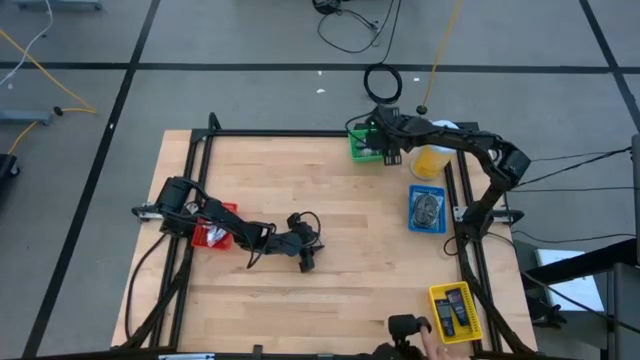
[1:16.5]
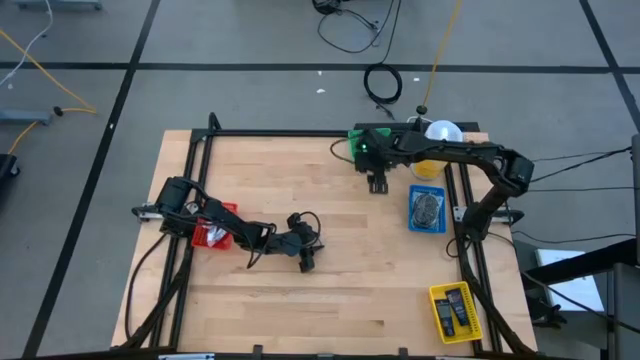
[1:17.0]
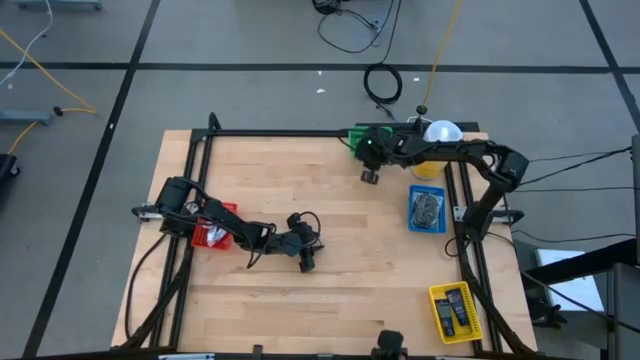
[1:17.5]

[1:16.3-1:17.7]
Task: Pick & Place Travel size toiletries
Adjust the green bin

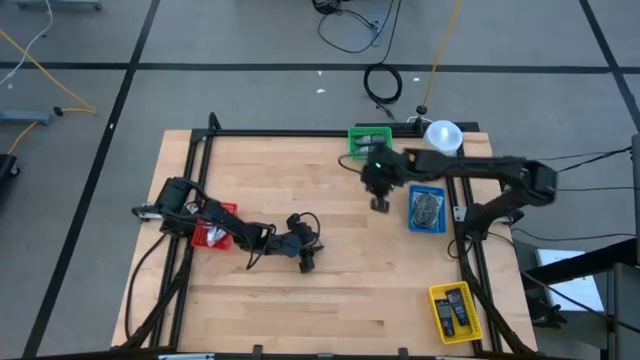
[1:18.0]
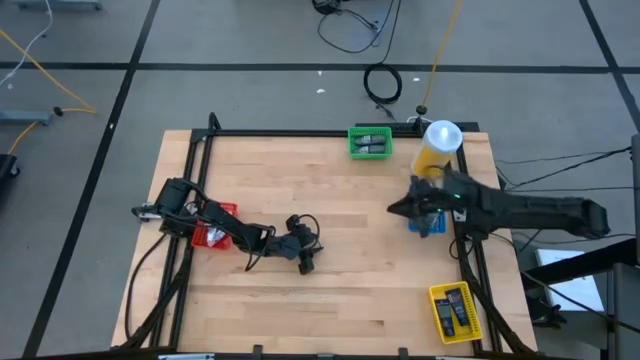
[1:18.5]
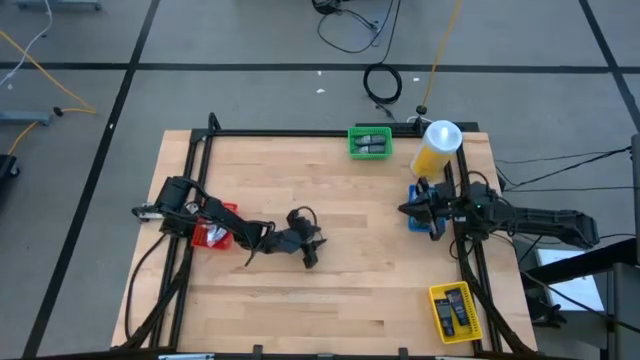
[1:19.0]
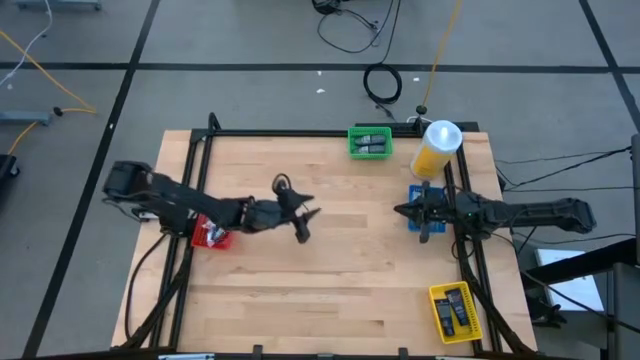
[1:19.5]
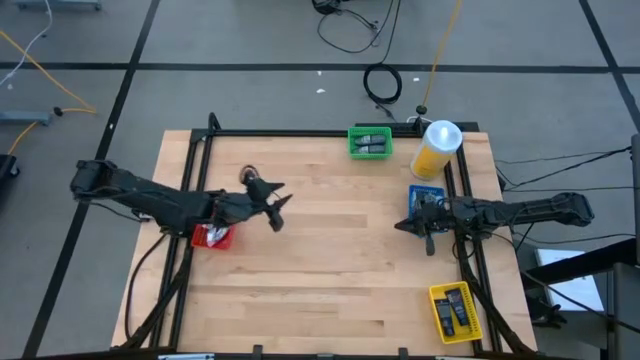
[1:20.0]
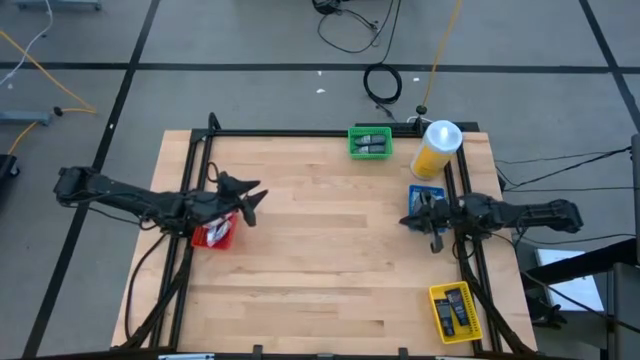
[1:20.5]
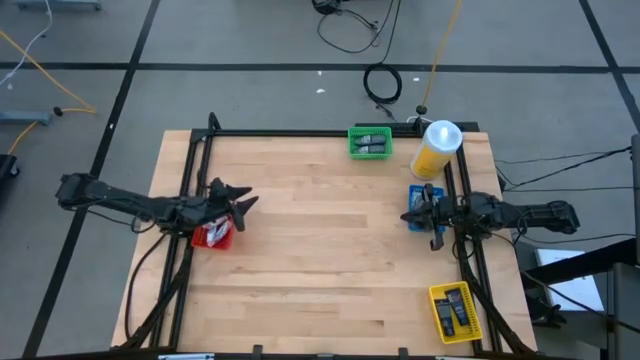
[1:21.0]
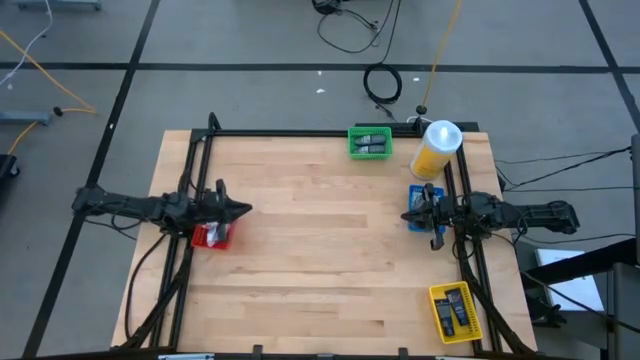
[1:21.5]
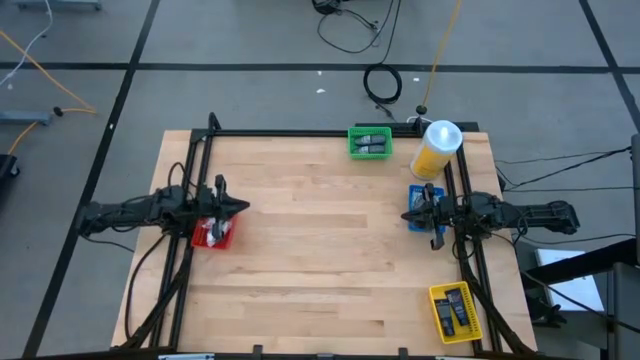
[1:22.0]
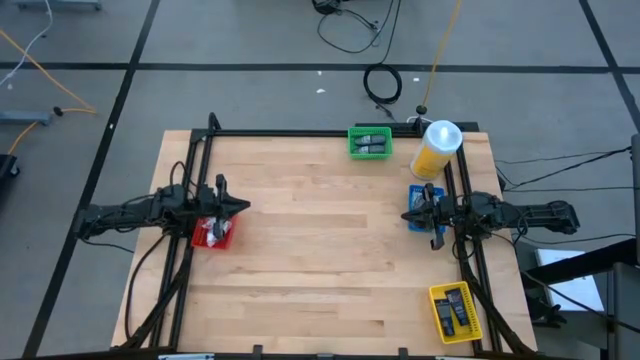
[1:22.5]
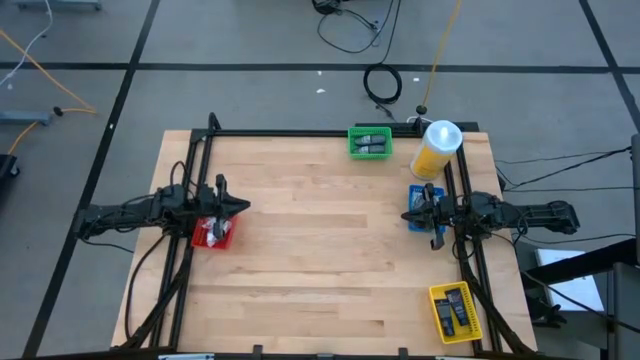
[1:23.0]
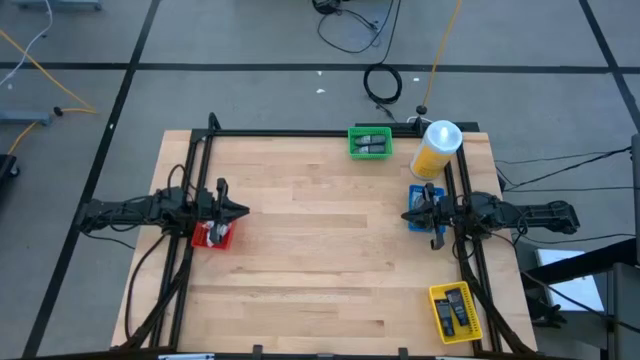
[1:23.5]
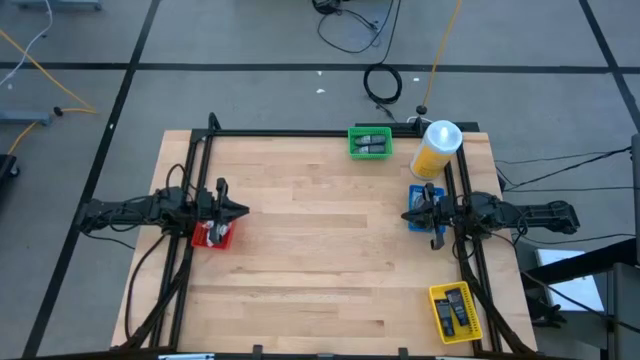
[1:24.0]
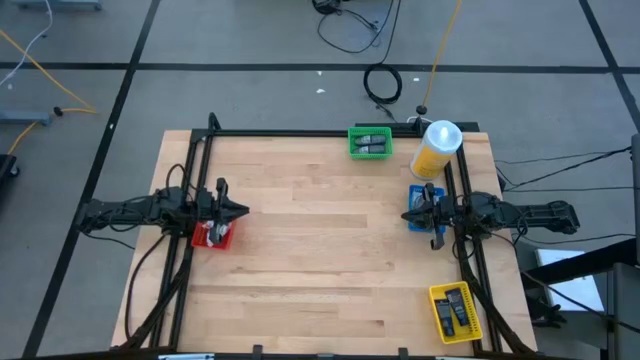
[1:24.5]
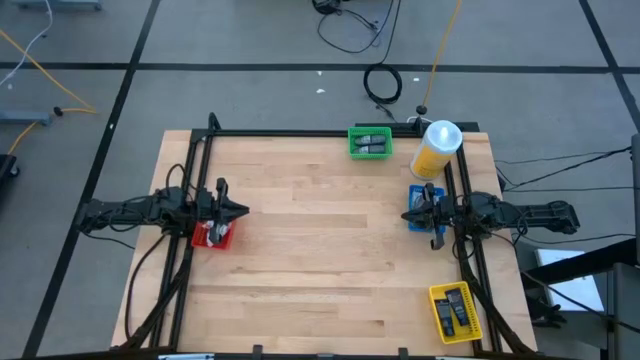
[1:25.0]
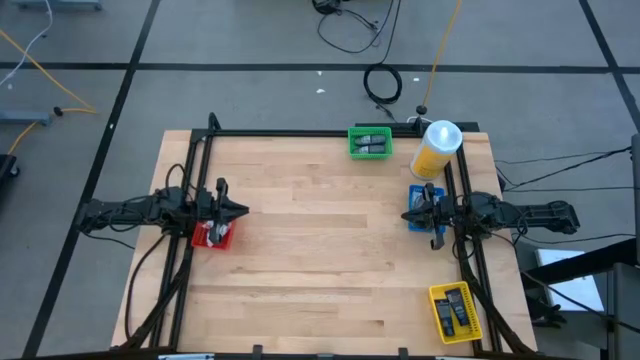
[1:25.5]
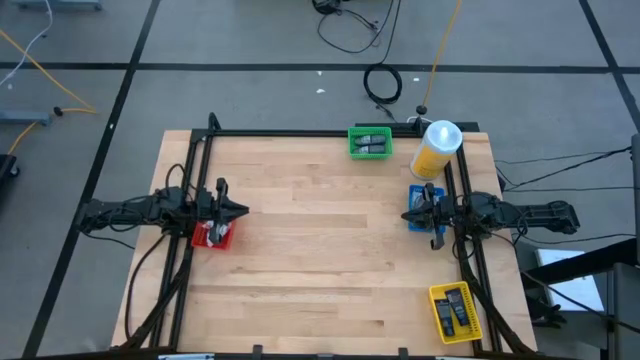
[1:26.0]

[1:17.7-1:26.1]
Return to Home Position

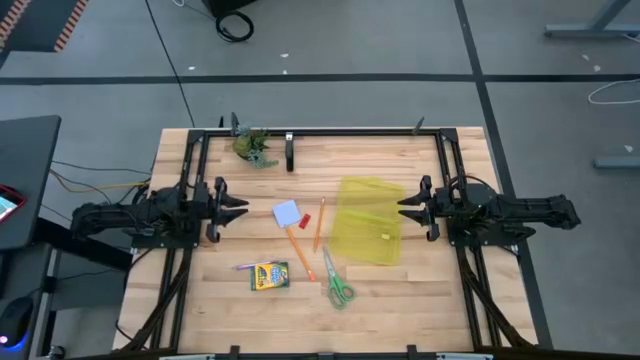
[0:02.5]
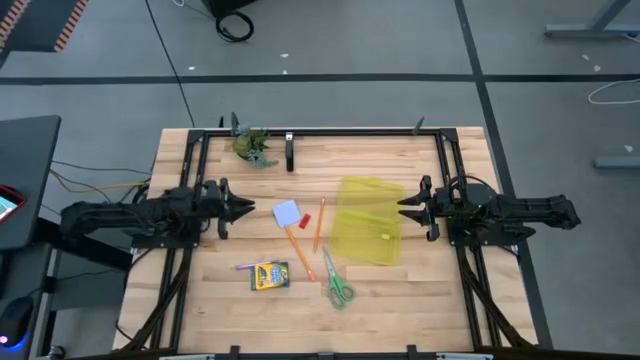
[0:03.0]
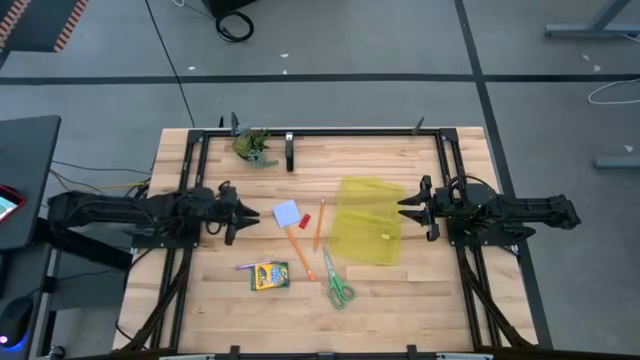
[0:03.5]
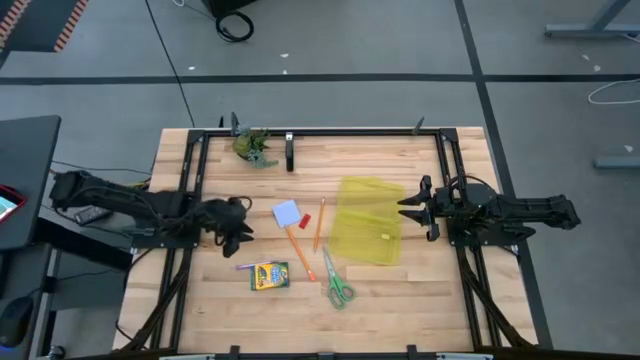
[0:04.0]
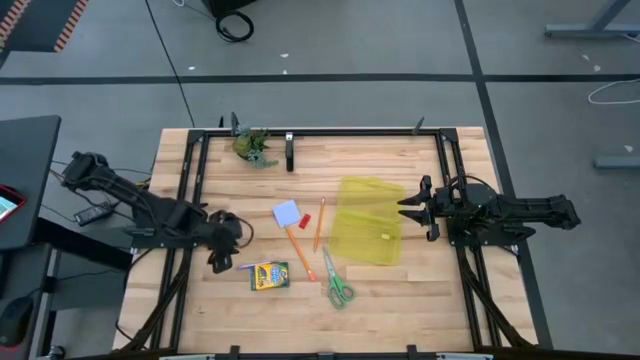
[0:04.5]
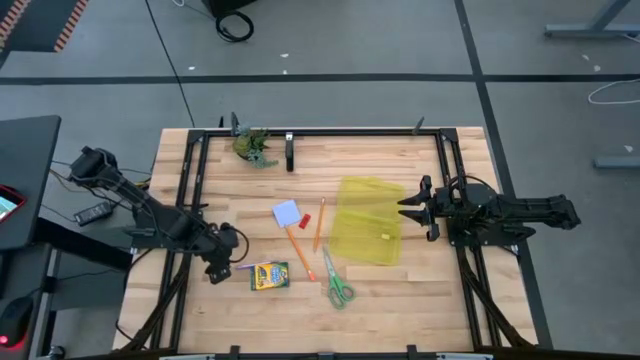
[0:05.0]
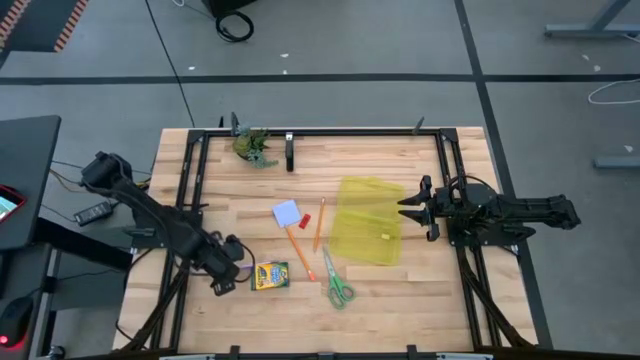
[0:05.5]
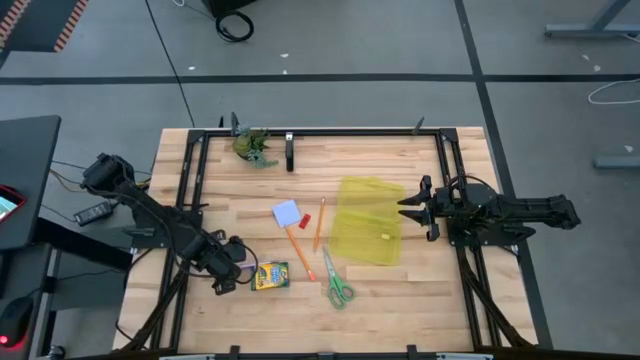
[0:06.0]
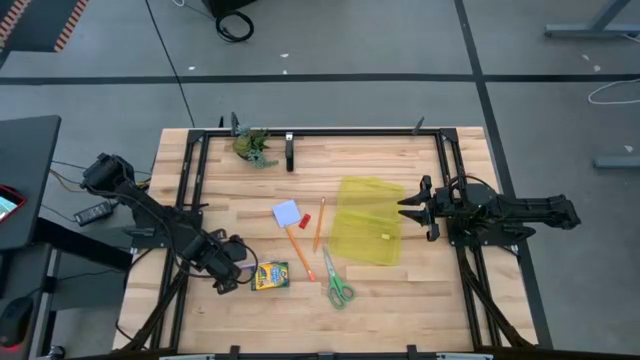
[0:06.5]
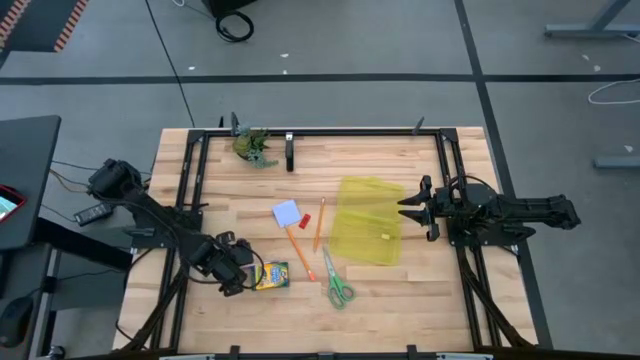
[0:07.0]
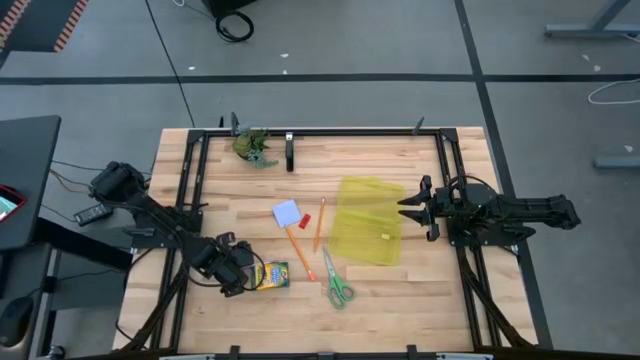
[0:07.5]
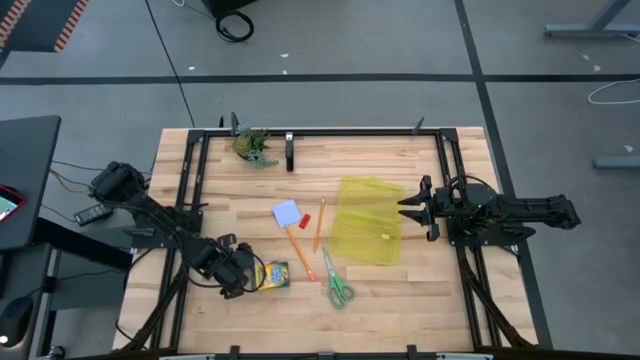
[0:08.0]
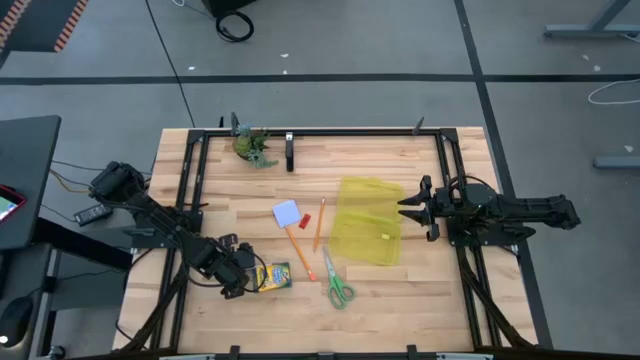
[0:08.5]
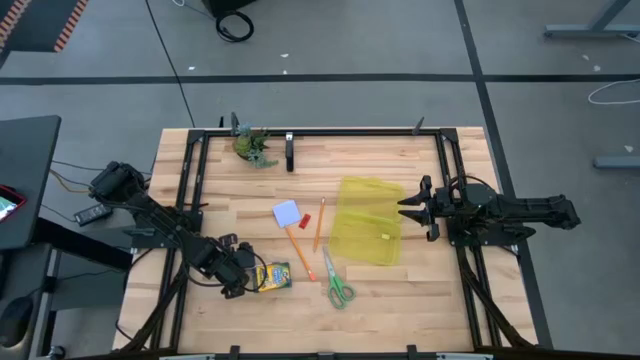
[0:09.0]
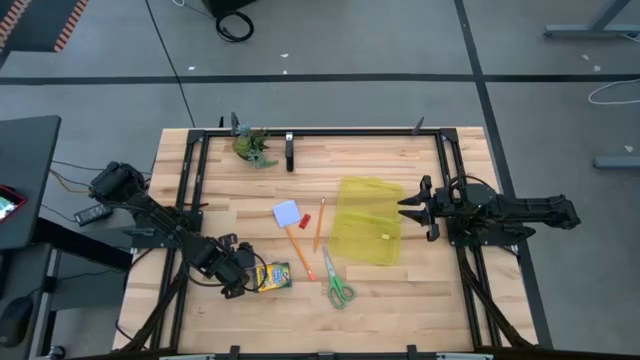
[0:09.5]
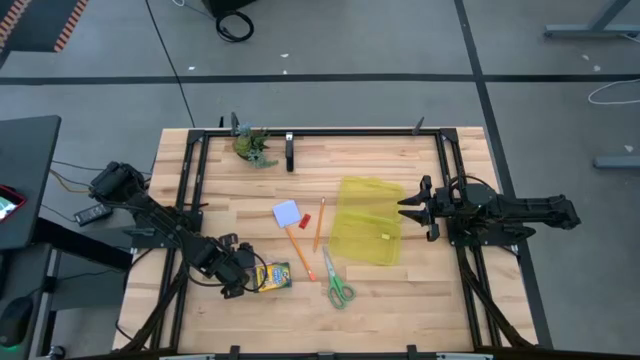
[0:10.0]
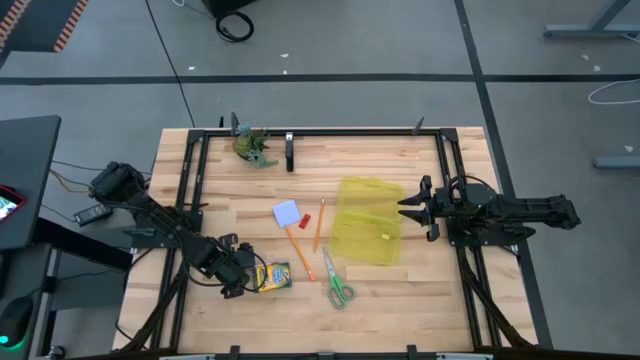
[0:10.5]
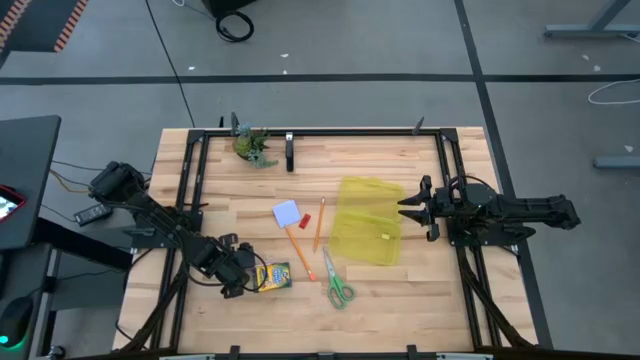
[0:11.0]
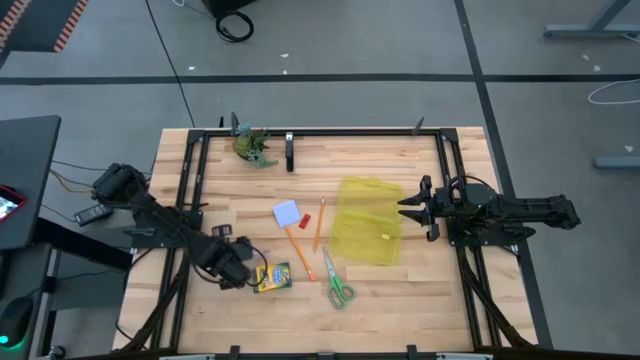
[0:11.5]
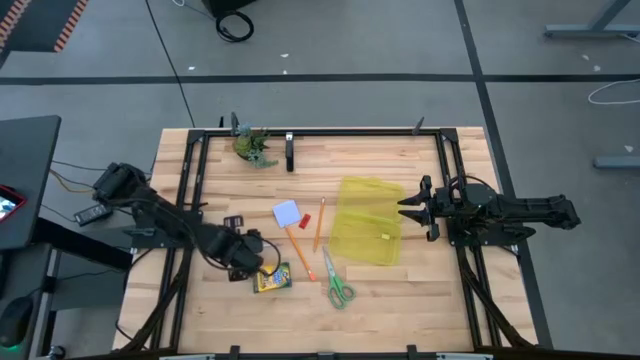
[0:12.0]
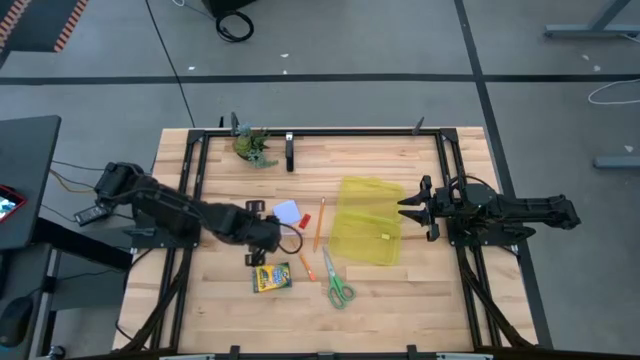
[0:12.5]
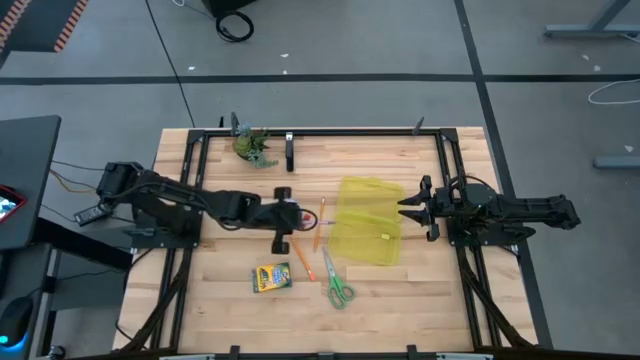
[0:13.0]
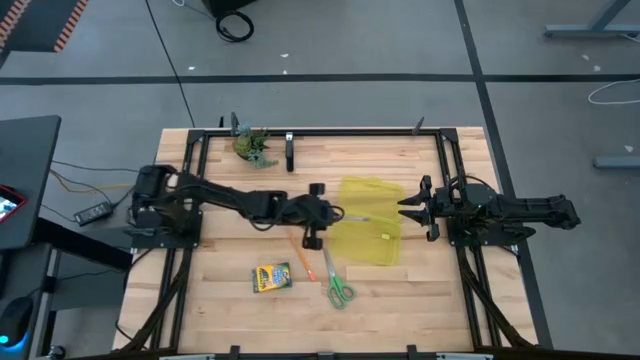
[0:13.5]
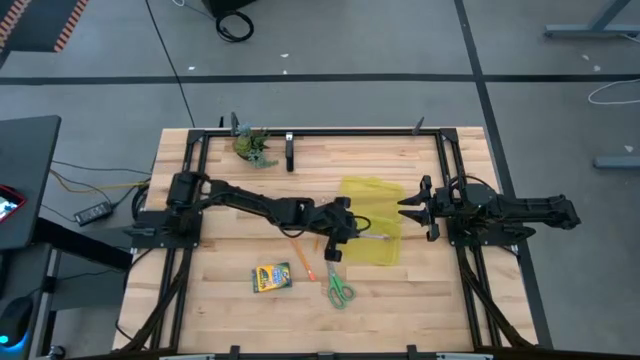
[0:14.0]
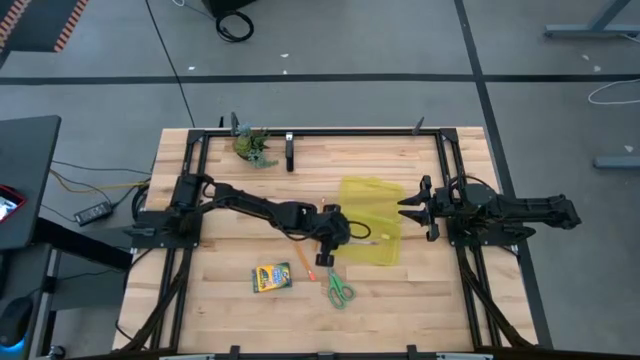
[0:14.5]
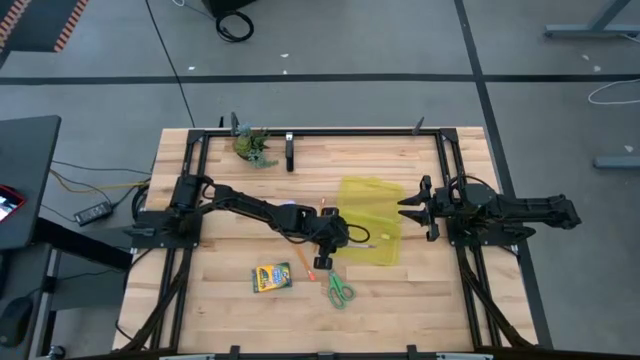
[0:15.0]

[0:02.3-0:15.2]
Task: Pack school essentials
Put the purple pen into the yellow supply box
